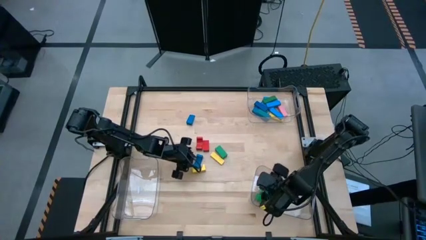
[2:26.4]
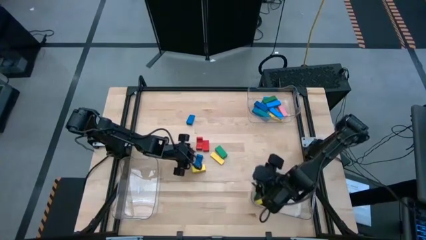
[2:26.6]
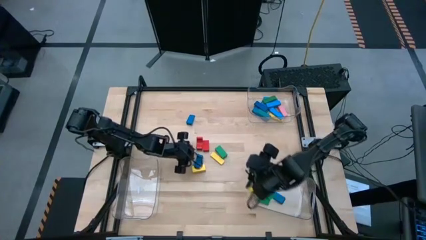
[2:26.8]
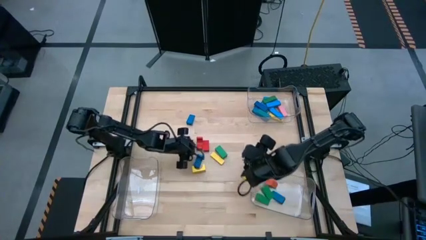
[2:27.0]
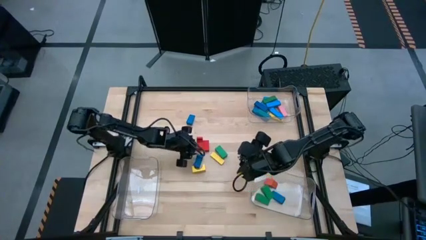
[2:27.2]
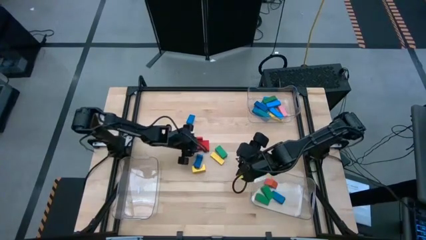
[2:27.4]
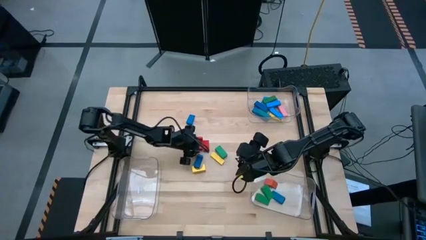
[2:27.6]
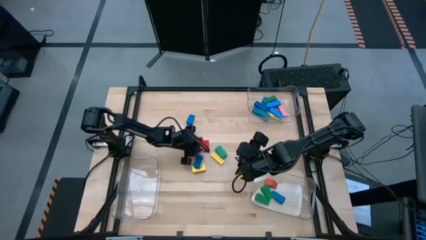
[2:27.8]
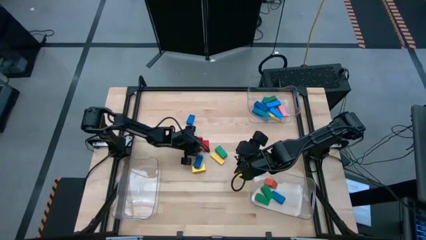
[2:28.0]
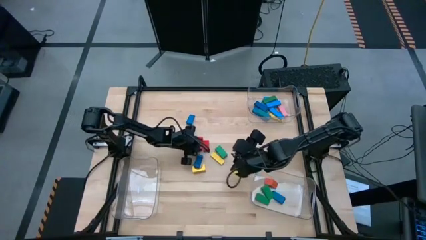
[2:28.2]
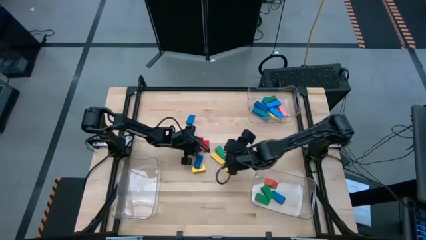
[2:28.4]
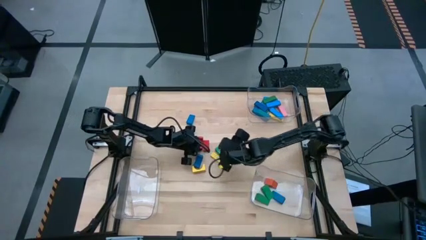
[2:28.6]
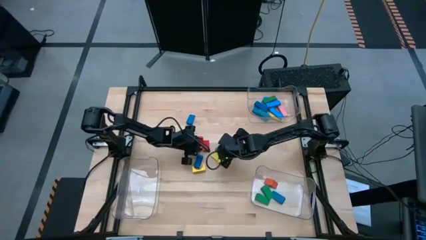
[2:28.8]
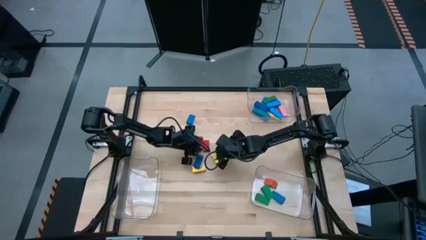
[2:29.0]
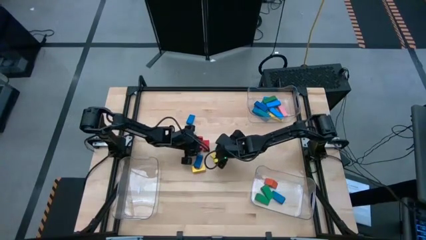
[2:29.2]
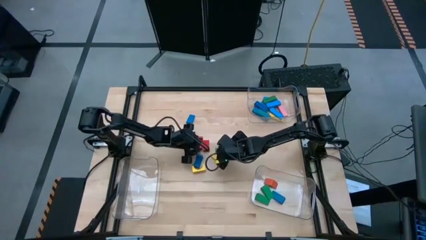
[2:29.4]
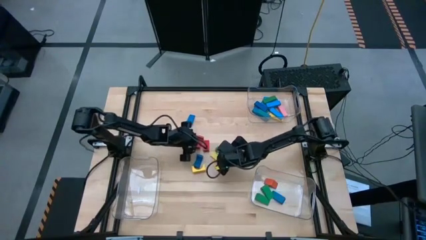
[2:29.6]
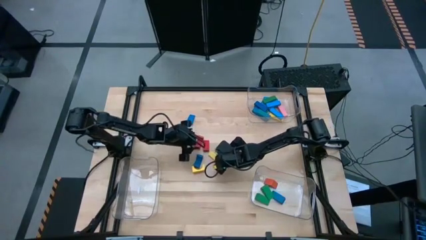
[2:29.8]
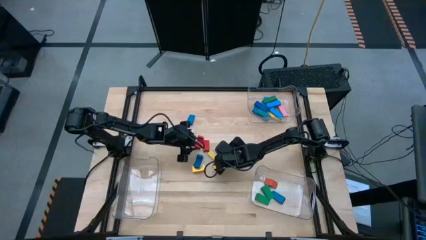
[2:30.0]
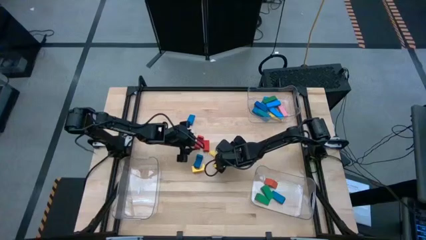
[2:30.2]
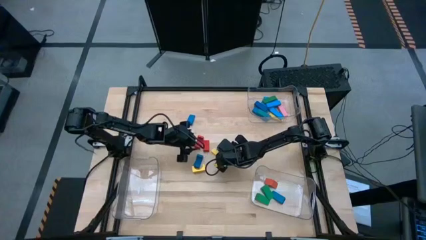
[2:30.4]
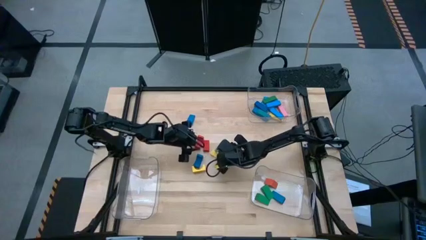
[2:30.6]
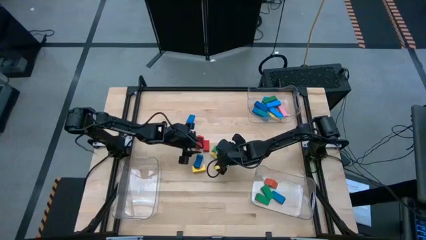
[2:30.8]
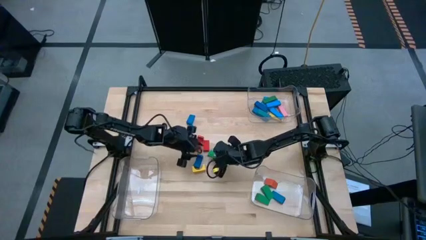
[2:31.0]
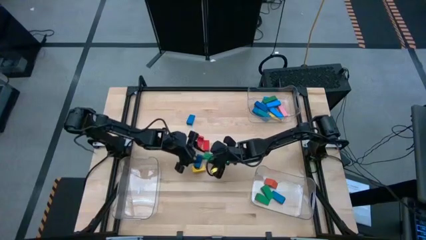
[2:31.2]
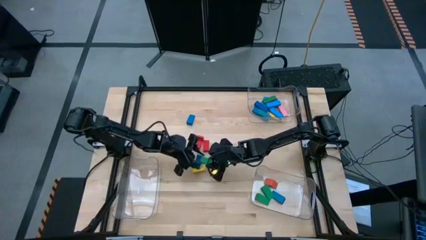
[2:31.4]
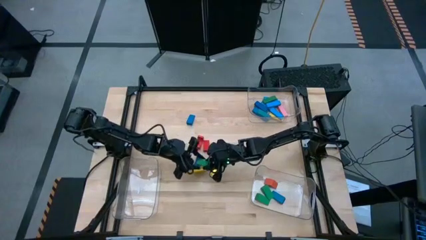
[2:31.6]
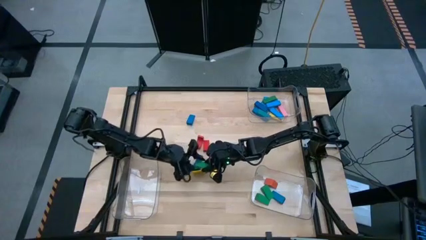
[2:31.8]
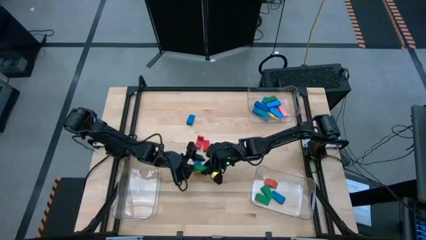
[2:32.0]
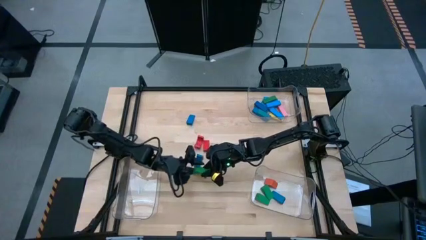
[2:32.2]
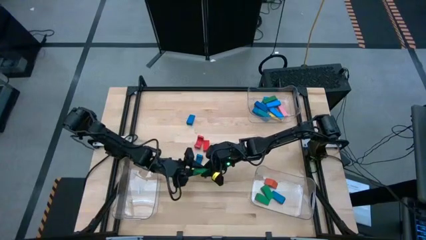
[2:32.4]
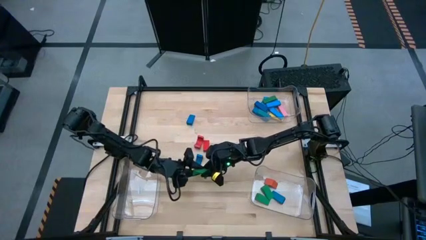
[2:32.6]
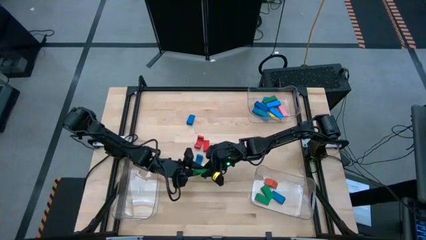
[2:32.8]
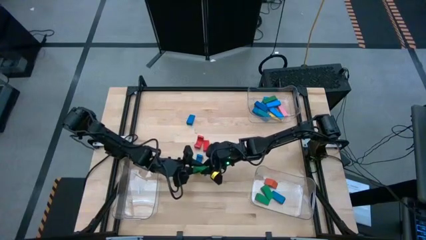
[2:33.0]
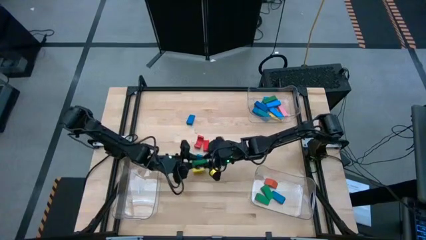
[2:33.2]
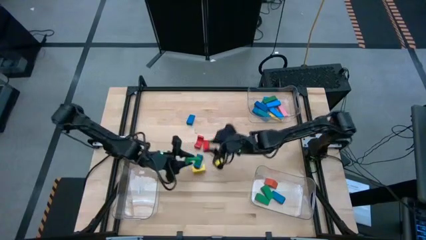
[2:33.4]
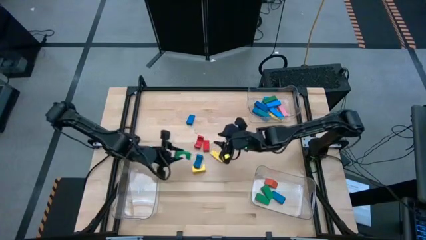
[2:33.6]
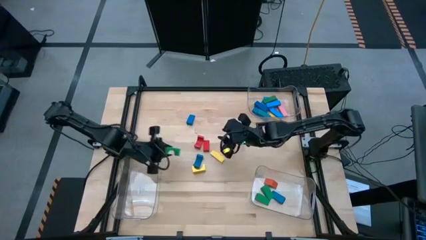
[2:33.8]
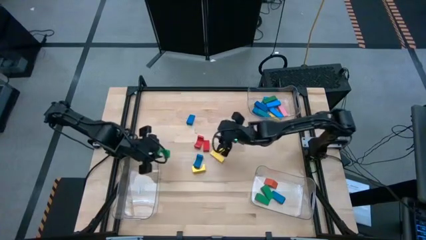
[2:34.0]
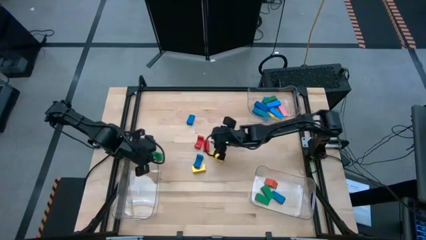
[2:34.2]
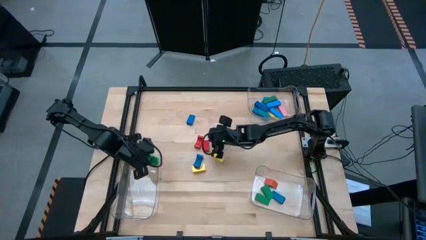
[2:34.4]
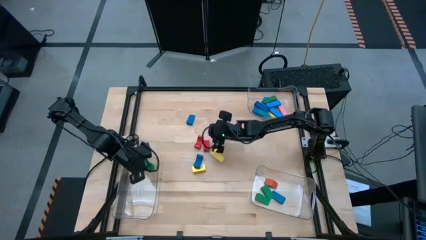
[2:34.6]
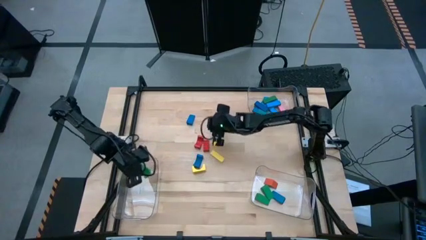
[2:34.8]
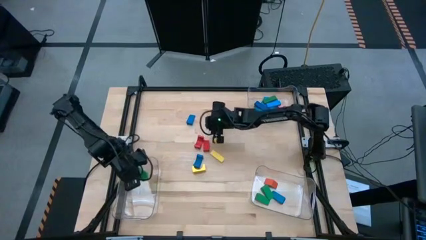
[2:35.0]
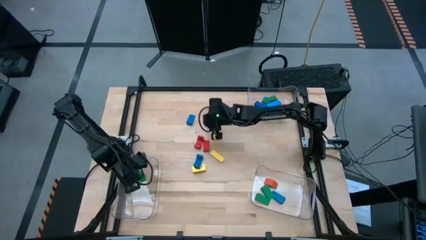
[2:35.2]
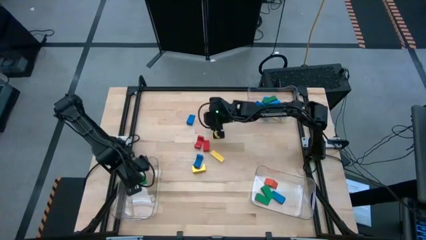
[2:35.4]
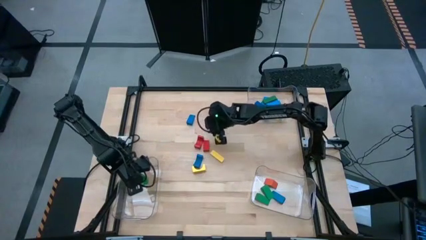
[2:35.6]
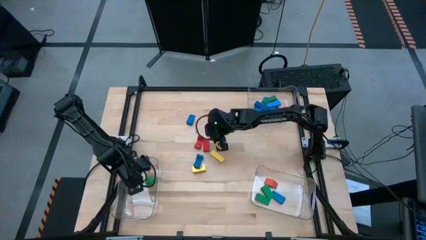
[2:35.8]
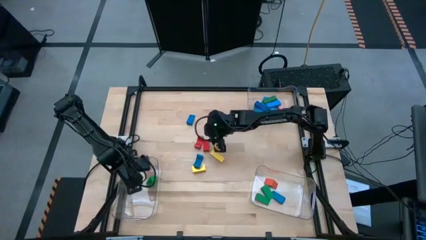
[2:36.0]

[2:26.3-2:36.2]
Task: Sort blocks by size
Put the green arch block into the bottom left transparent bin

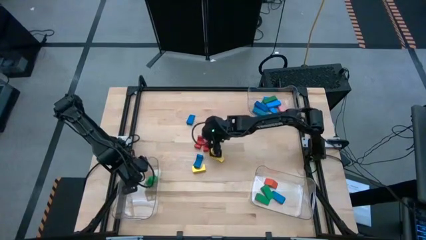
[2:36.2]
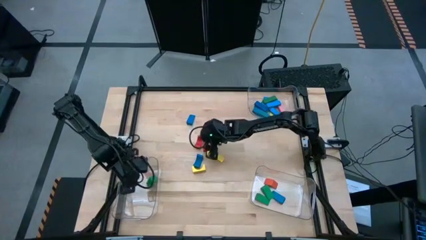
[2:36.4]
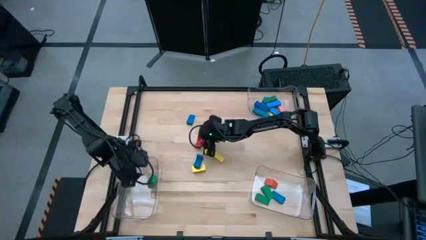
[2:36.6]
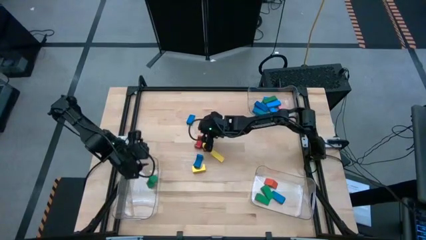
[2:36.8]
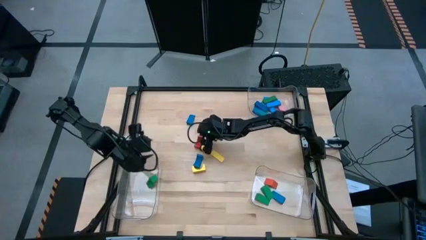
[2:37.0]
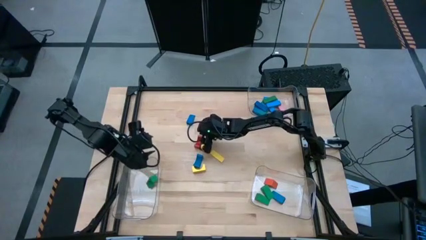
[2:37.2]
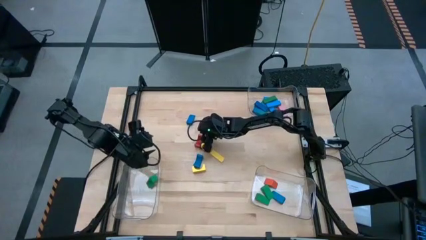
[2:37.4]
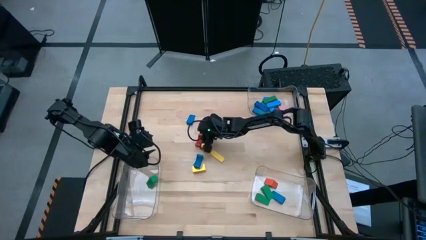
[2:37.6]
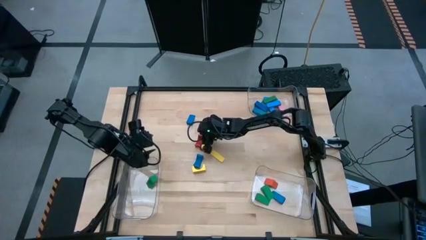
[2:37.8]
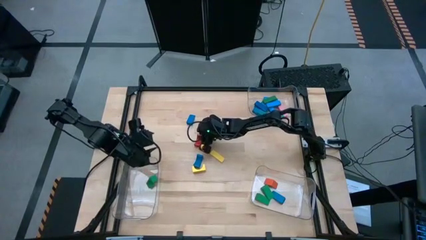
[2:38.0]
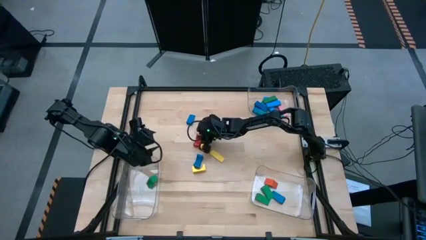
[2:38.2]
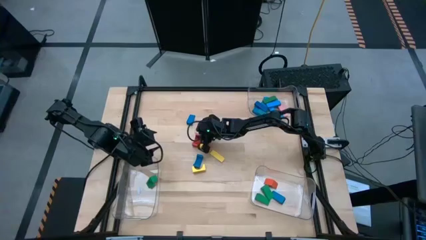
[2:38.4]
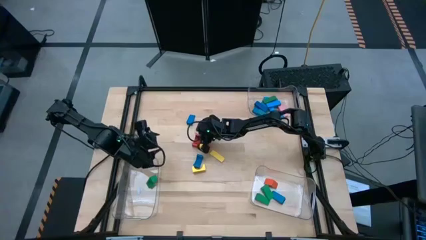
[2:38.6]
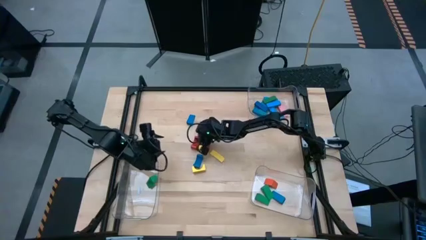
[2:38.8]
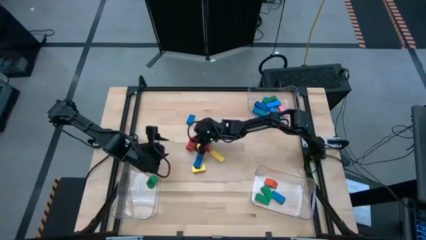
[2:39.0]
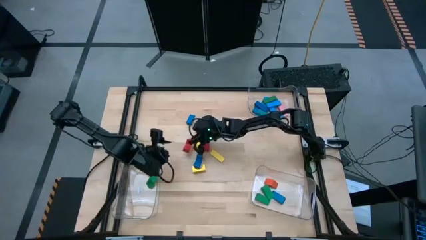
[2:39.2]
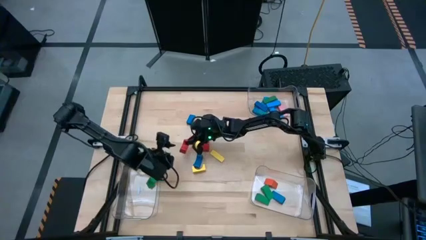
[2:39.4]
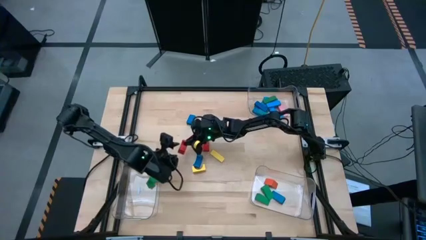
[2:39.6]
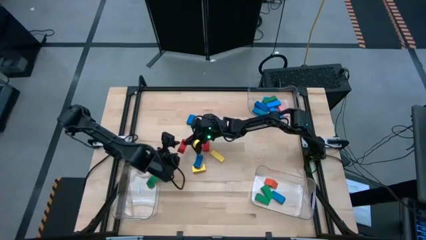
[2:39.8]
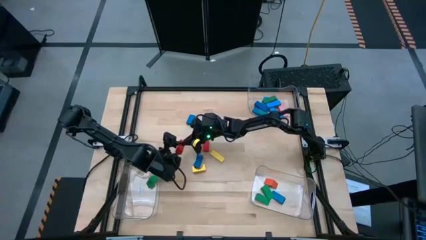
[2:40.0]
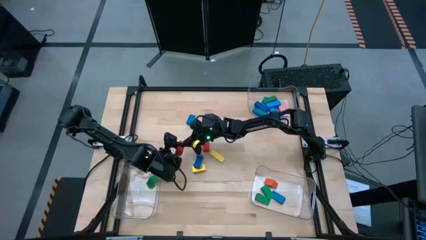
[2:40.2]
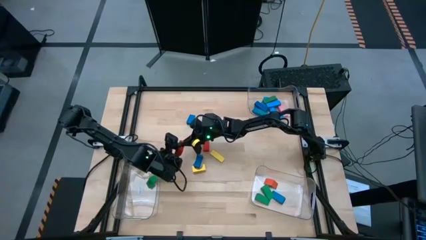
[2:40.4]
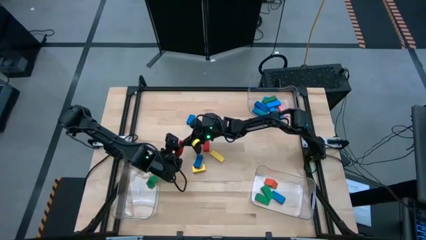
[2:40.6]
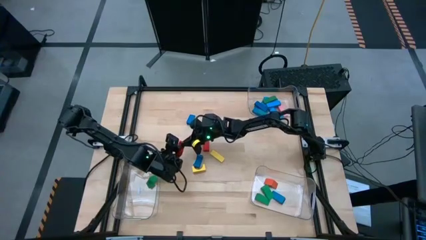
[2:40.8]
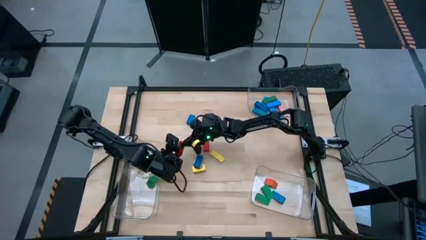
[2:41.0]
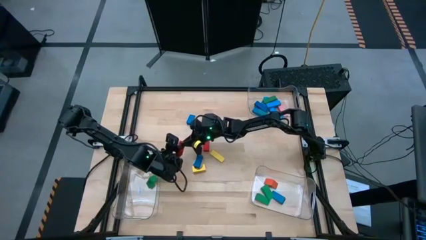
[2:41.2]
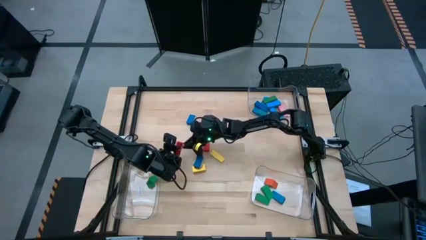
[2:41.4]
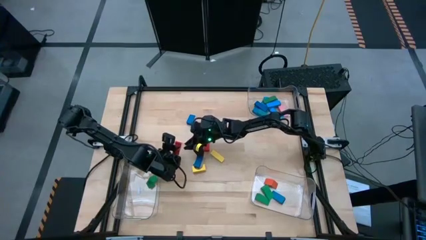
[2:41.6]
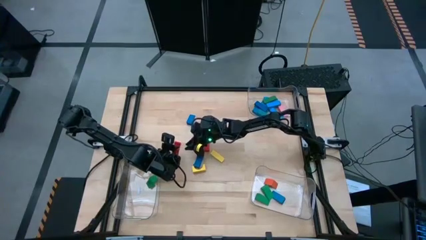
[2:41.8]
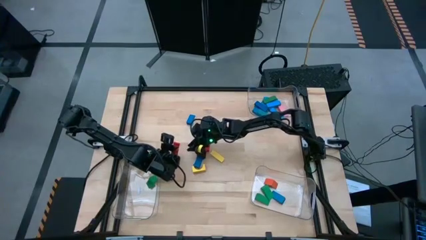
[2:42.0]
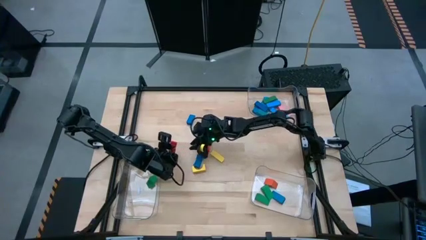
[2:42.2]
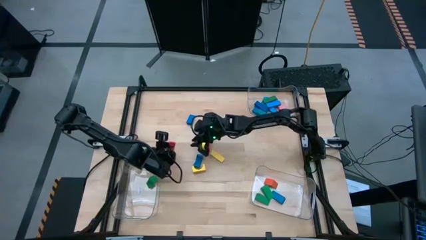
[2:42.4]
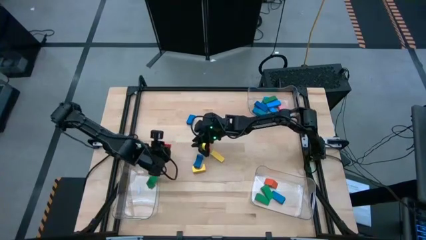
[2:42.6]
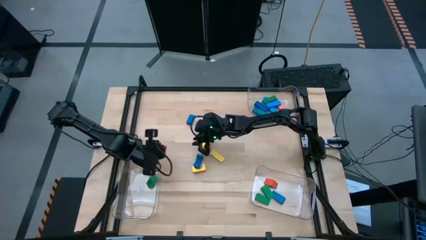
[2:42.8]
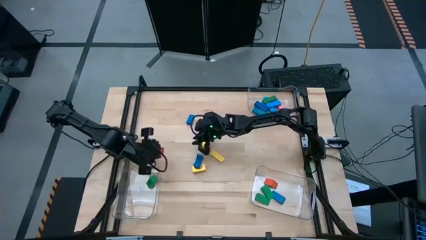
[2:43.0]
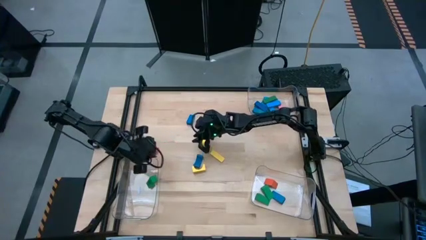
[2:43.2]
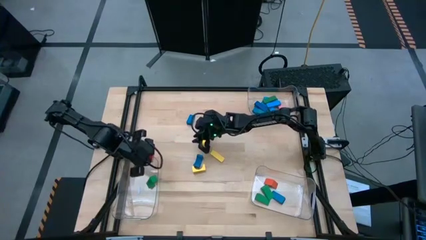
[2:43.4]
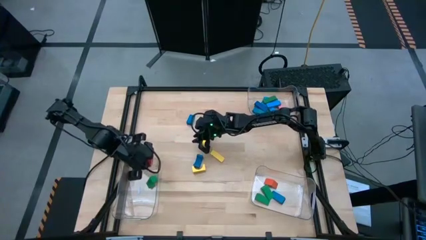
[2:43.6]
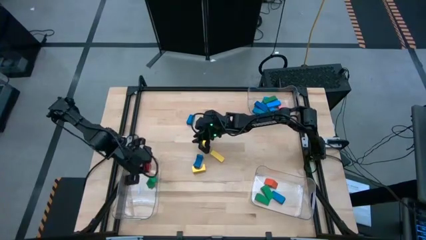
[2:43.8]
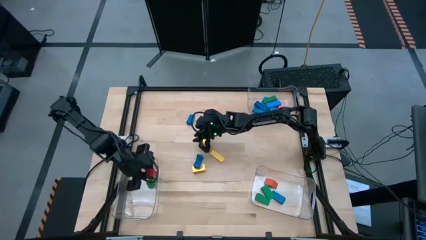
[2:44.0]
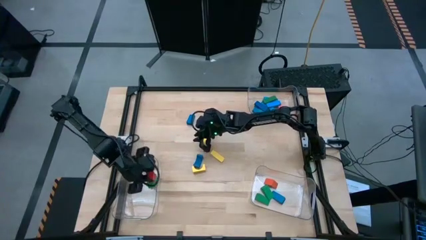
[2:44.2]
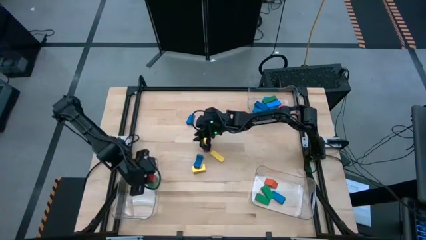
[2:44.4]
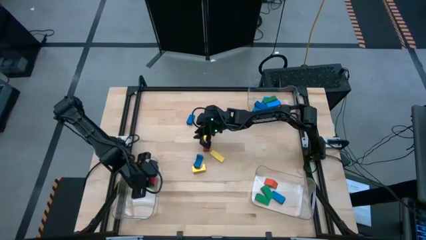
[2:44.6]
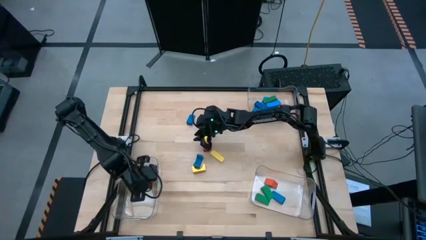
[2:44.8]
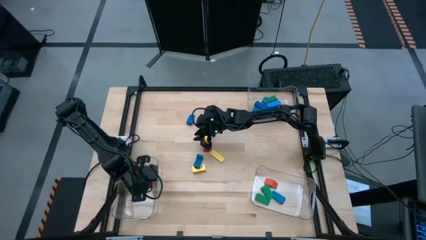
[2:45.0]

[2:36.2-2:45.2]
Put the red arch block into the bottom left transparent bin
